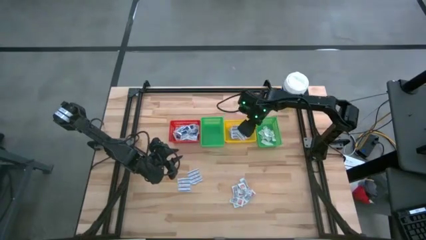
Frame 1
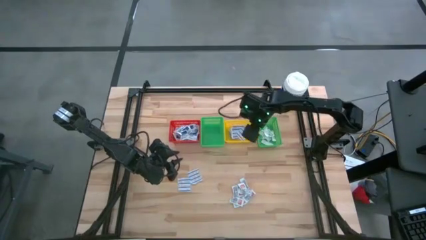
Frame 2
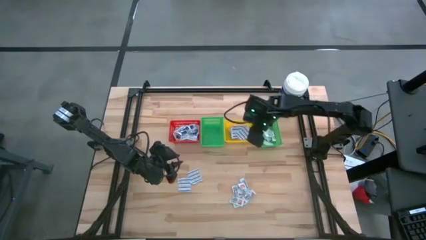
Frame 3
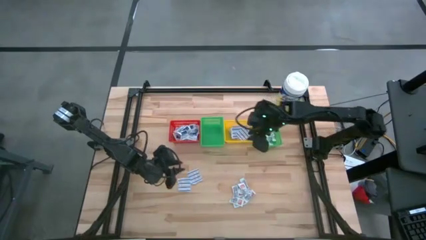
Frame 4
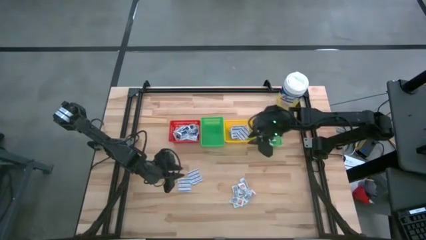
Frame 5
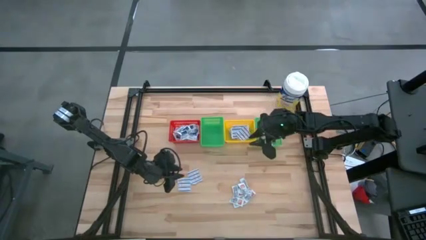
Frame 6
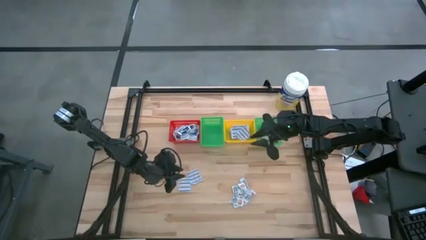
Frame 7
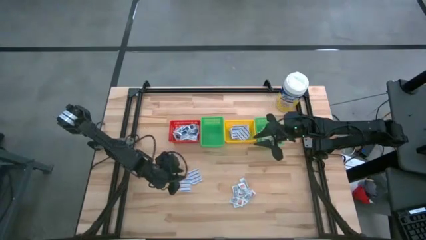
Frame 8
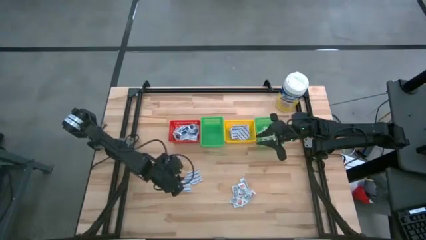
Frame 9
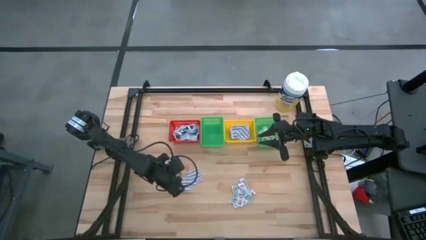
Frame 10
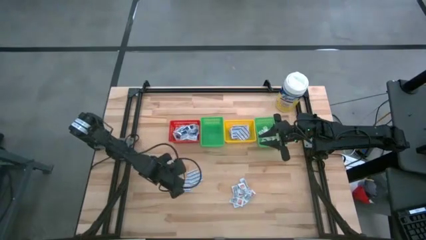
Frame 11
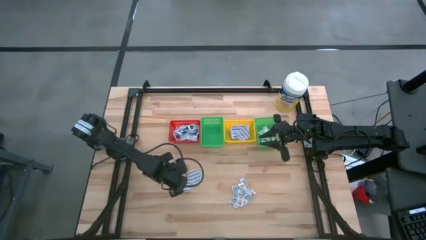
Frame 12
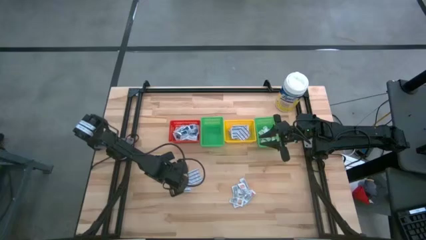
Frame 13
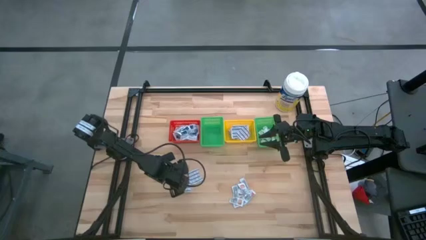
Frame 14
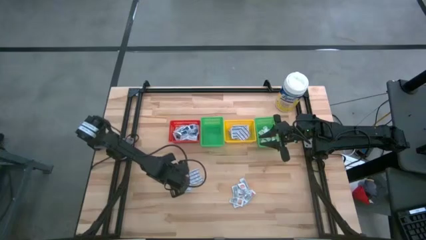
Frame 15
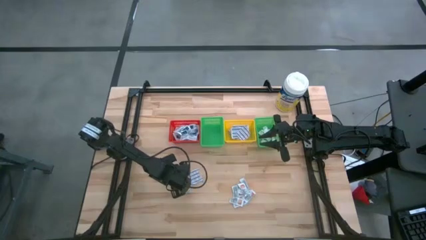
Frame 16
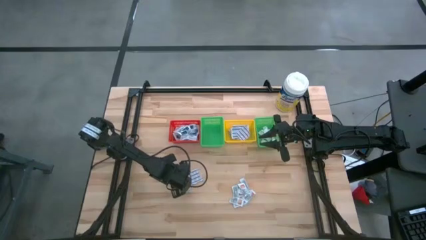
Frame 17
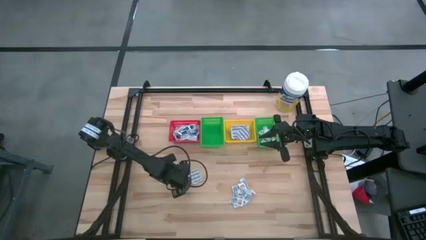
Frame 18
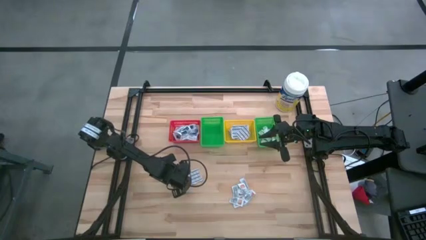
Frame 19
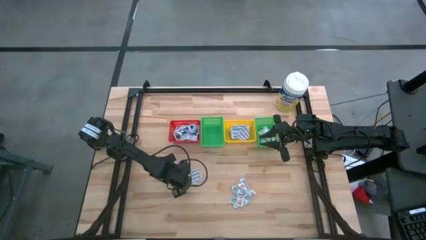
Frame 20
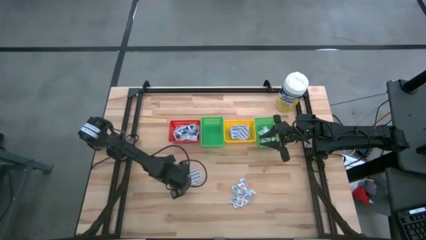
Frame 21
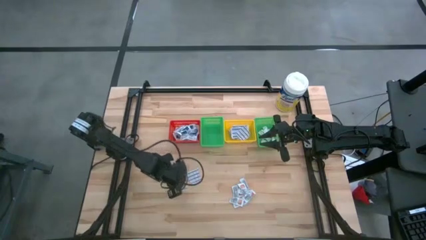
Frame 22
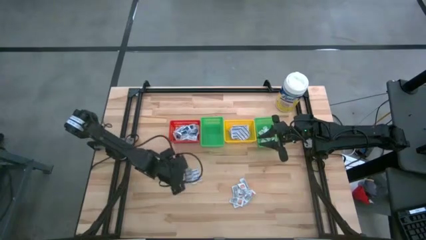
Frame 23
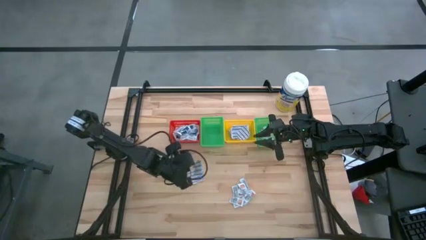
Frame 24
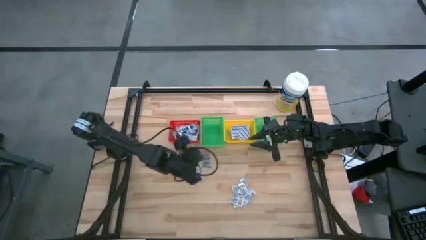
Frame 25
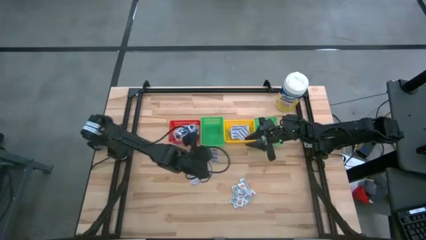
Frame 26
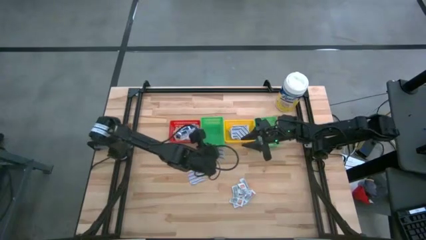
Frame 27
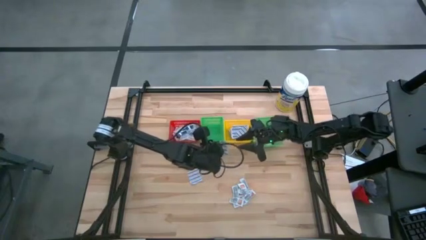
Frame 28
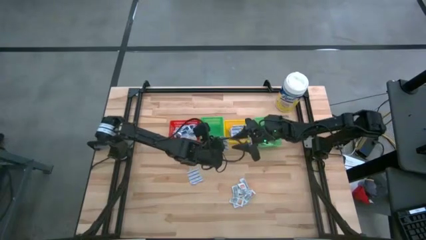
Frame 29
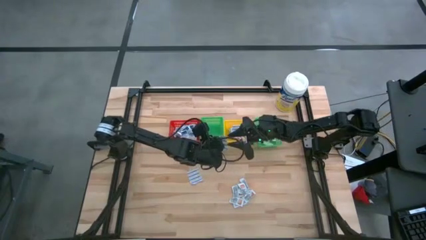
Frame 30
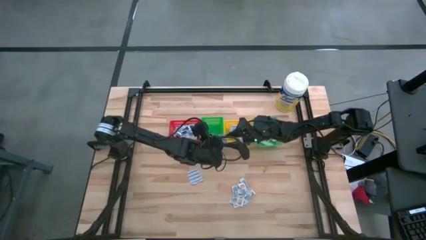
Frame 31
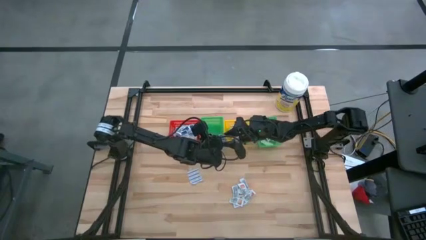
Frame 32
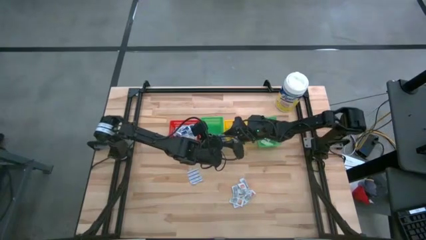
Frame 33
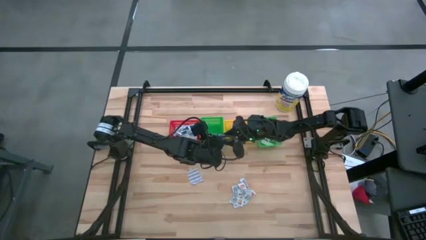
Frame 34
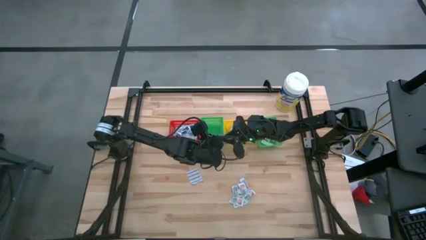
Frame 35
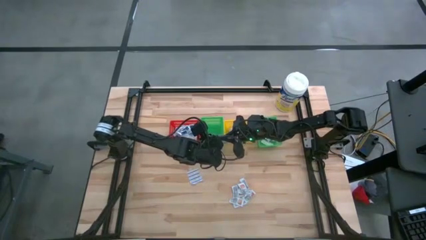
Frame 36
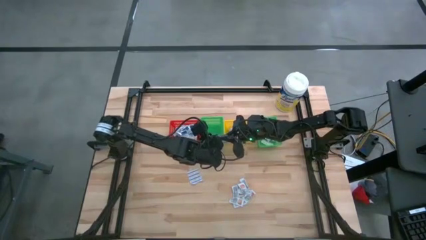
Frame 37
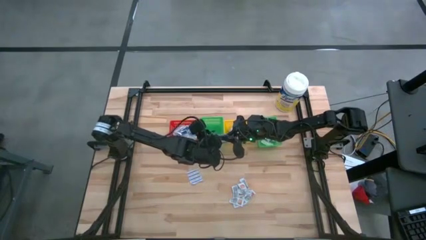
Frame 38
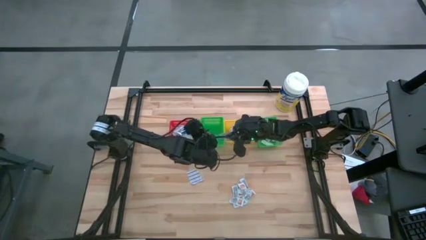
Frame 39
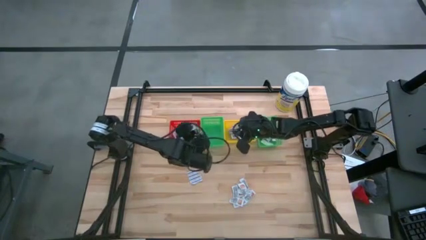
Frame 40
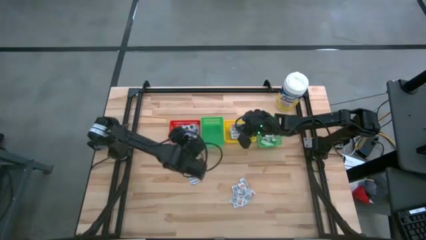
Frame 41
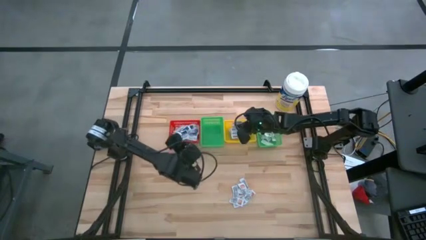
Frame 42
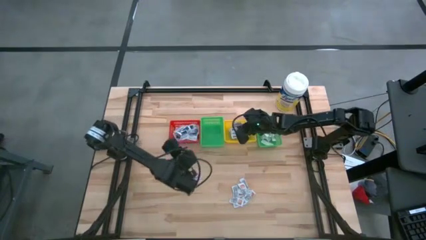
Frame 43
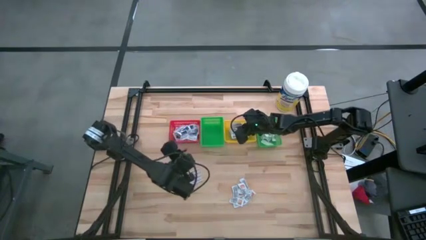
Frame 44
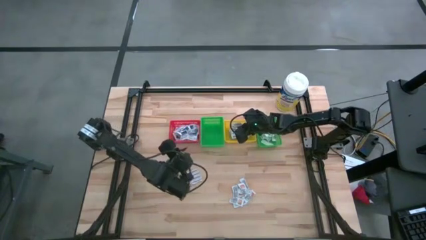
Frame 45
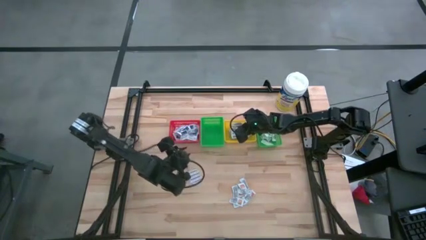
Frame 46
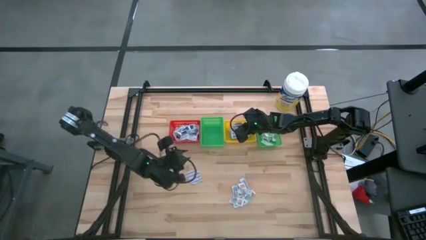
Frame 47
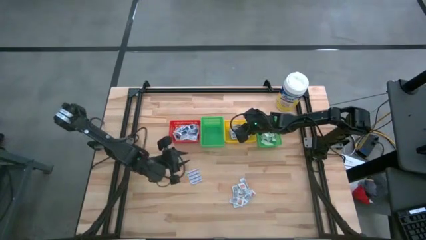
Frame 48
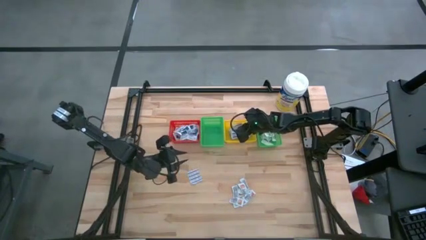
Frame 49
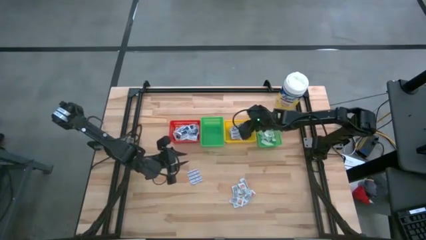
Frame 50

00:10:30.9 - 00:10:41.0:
Task: Pick & Place First Aid Supplies
Put the blue bandage into the yellow basket

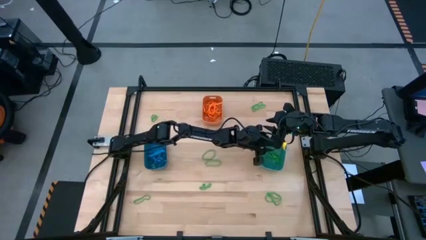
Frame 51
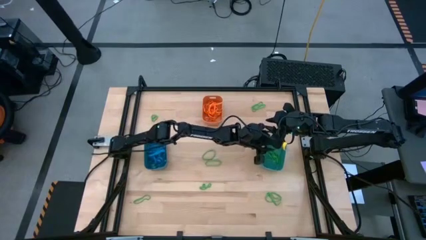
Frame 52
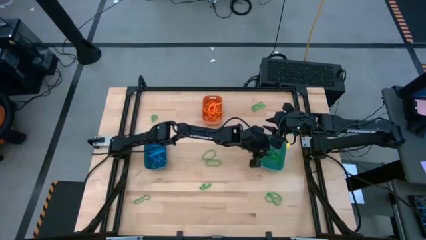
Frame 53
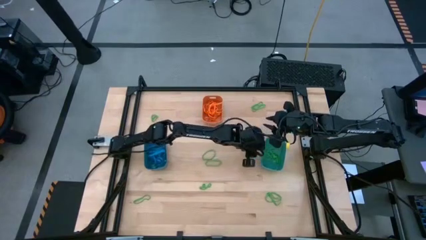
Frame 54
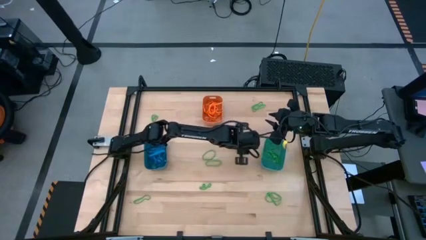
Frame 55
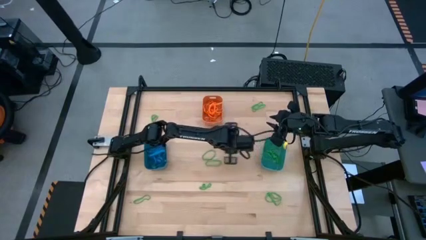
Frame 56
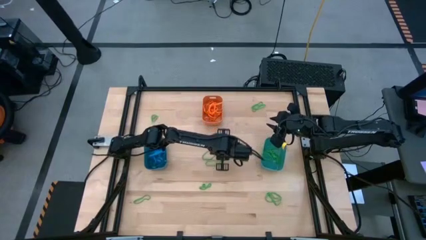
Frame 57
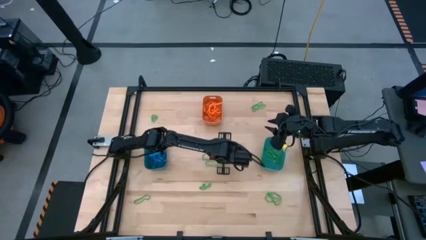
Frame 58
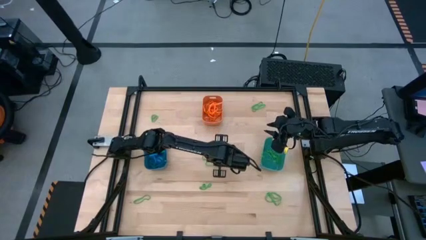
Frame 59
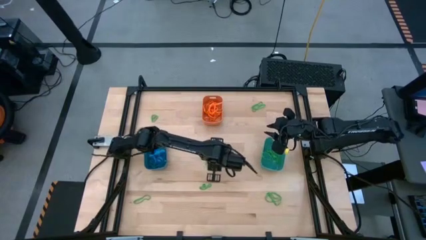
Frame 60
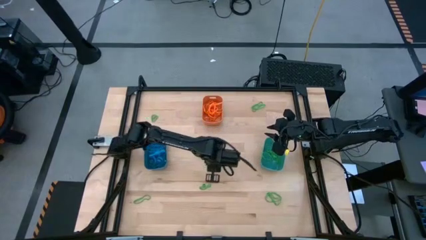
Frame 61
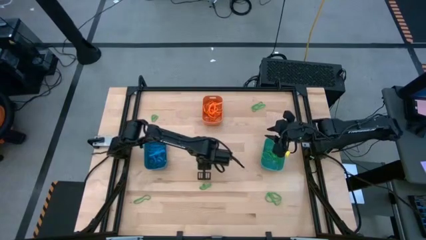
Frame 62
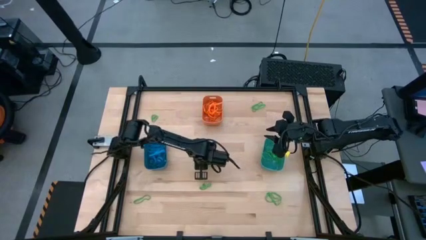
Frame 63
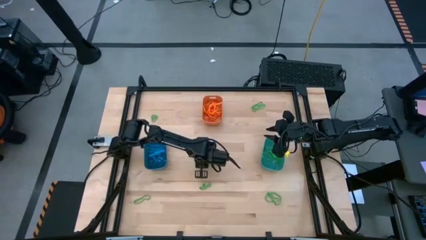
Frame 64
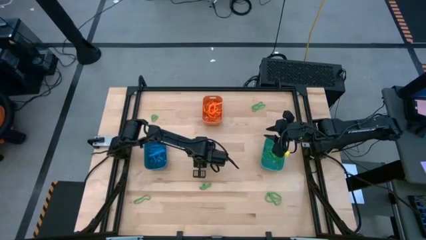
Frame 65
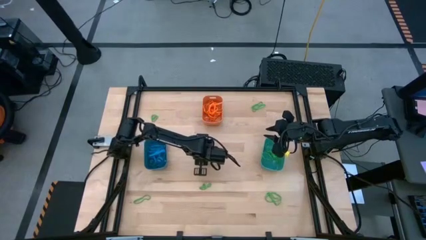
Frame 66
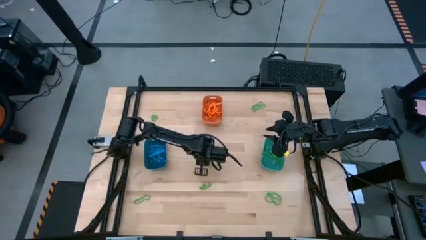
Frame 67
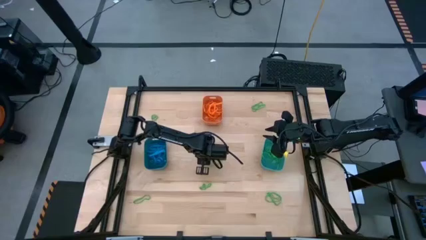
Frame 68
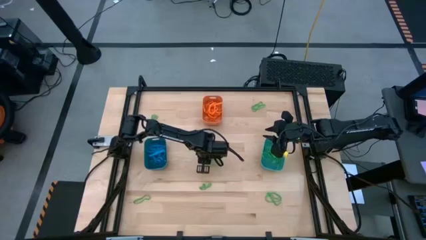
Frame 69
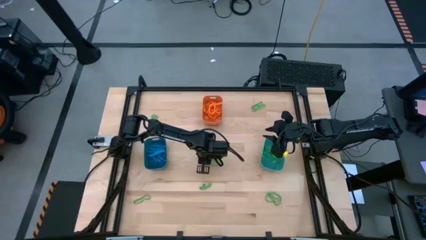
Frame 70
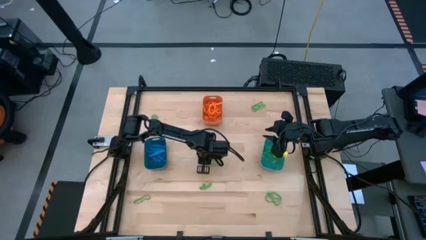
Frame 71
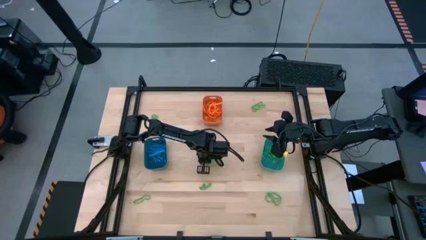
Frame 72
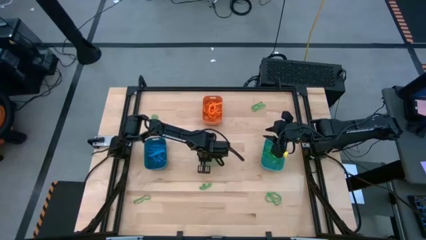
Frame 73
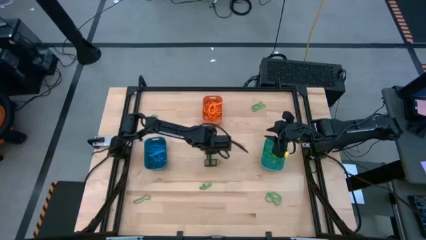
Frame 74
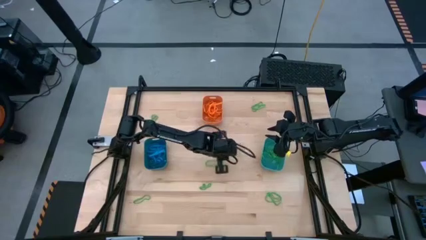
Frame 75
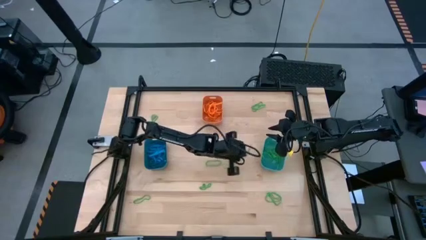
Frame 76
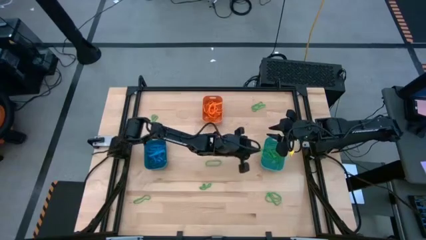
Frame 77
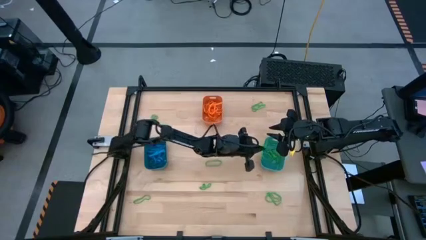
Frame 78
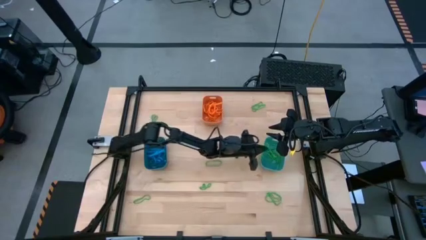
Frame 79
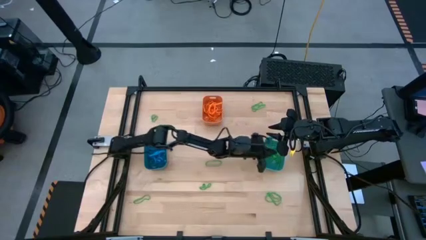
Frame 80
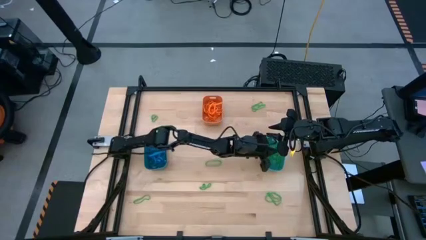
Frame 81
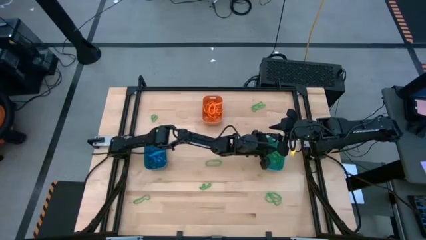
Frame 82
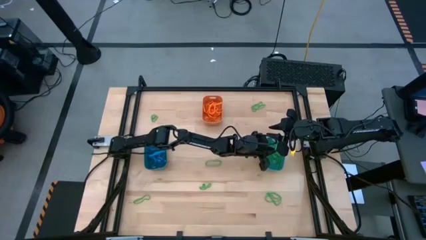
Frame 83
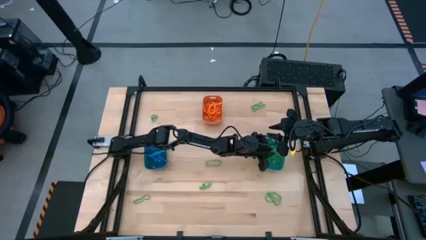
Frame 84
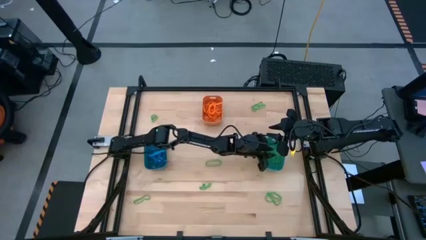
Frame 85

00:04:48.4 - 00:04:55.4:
Task: Sort rubber bands into baskets
Put the green rubber band into the green bin
